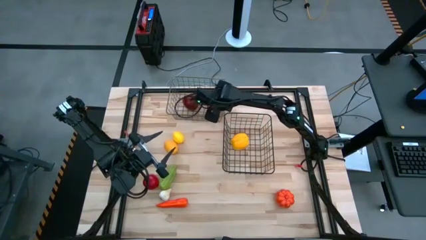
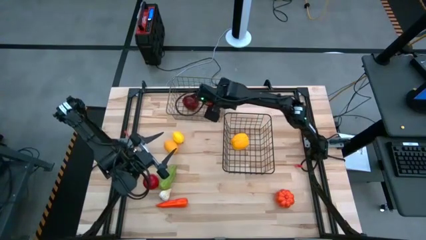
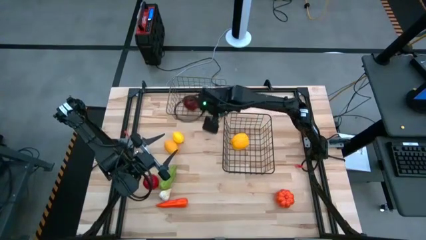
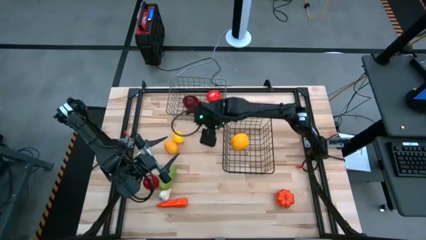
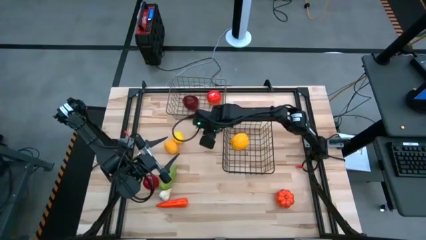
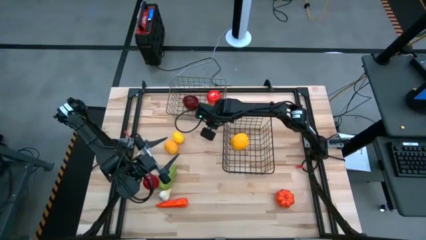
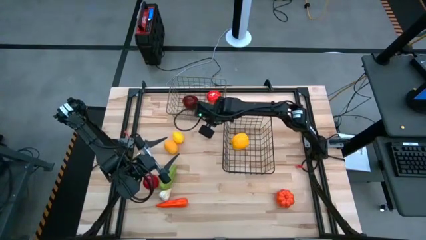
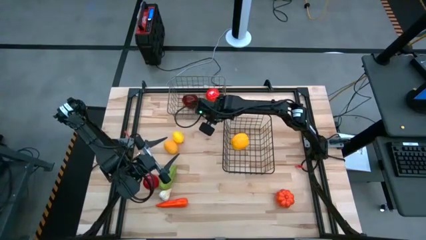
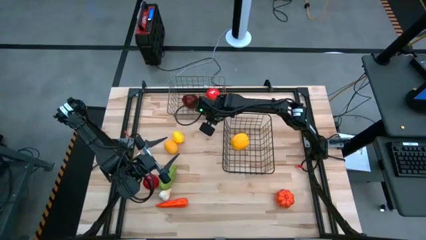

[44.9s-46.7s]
Task: Sort produce into baskets
Adjust the silver wire basket on the table

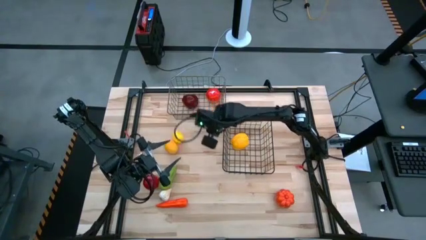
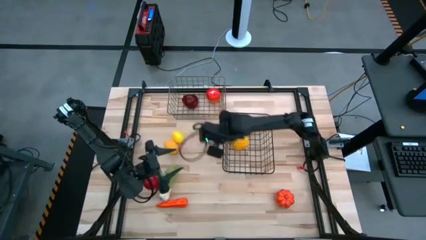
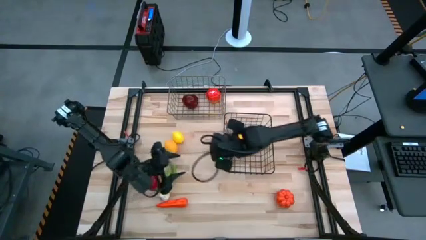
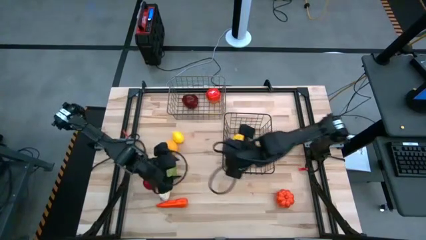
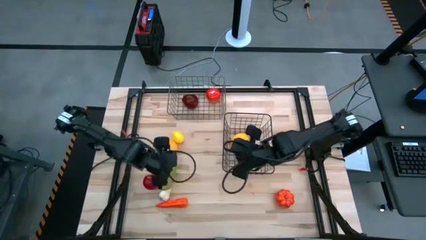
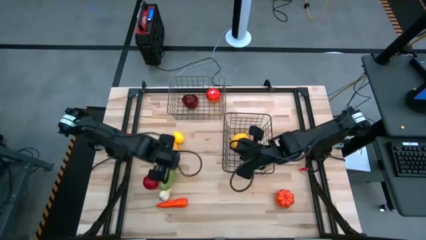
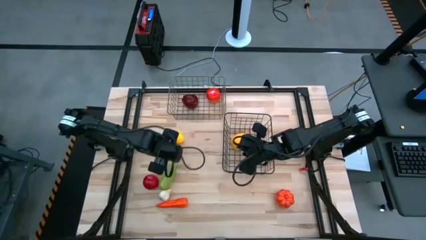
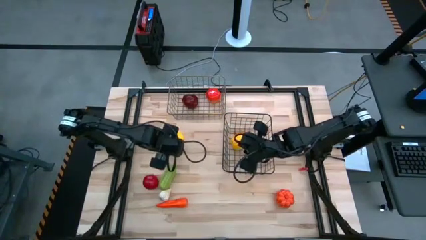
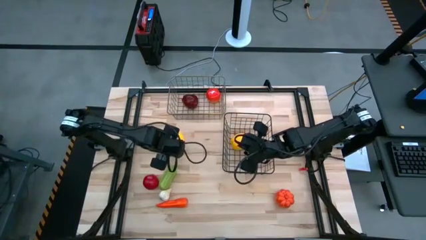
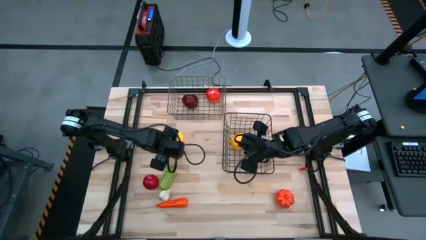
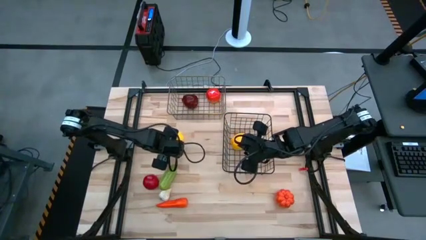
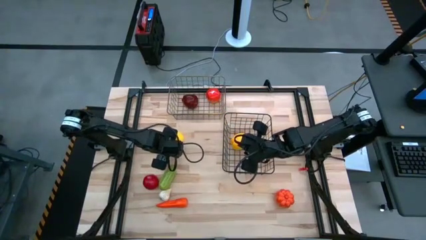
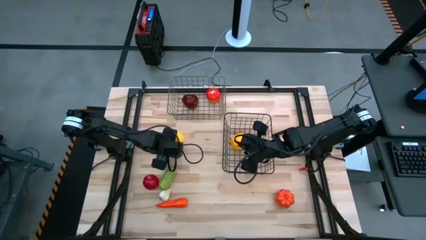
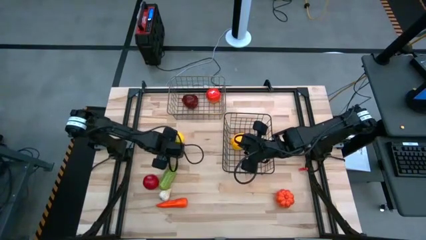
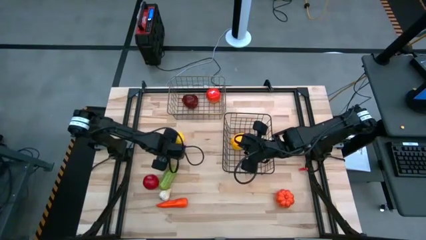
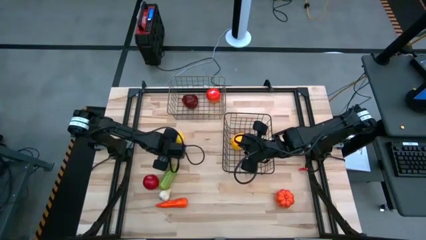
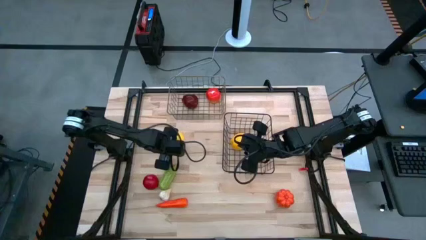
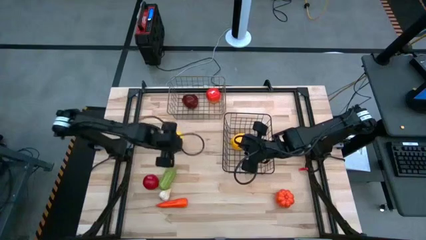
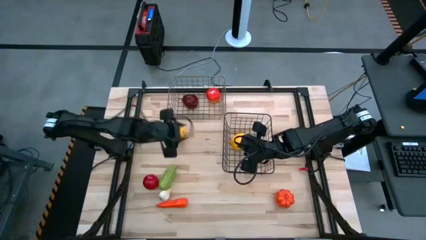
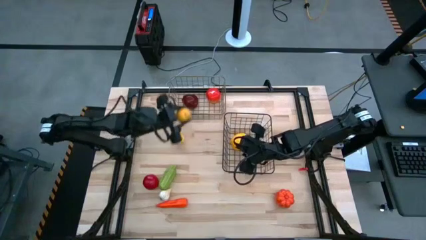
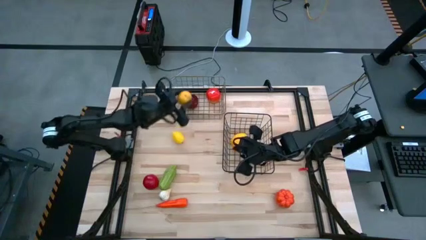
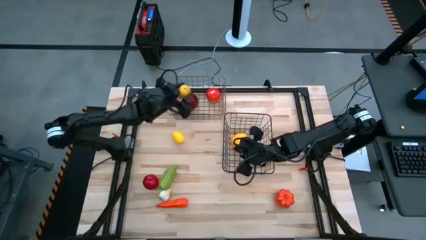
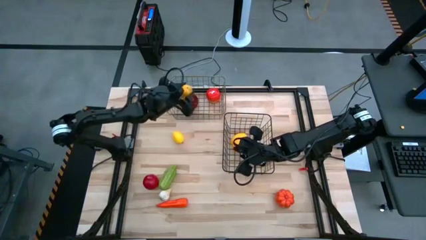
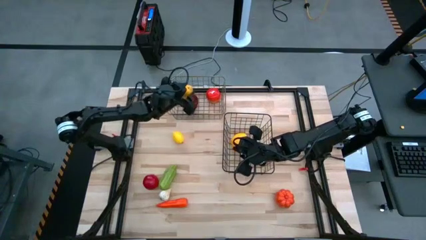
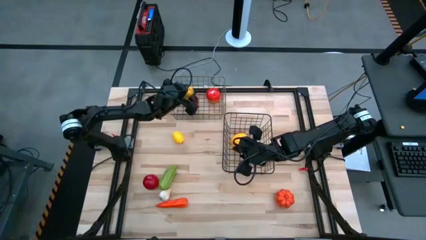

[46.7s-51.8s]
Put the yellow mango into the silver wire basket

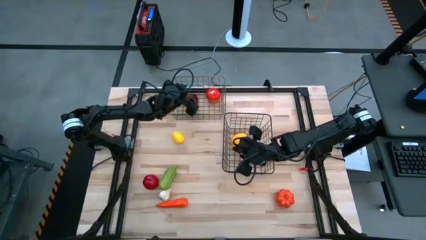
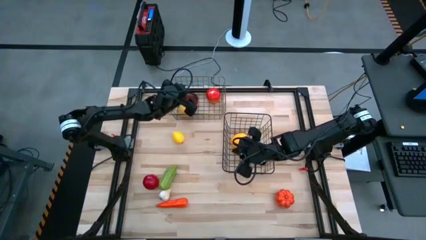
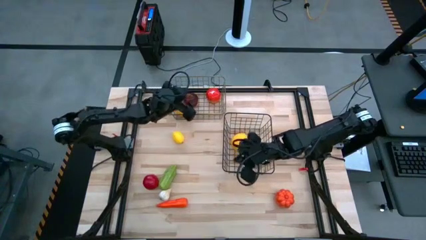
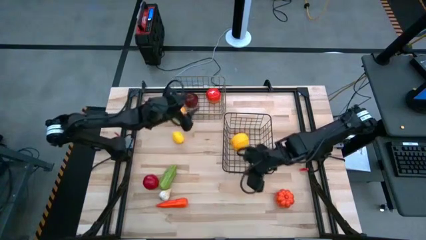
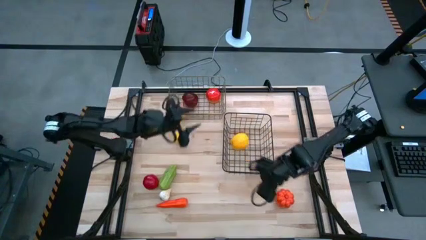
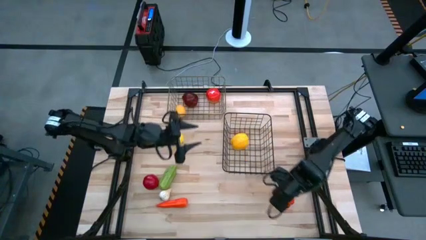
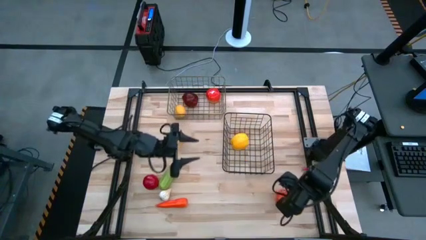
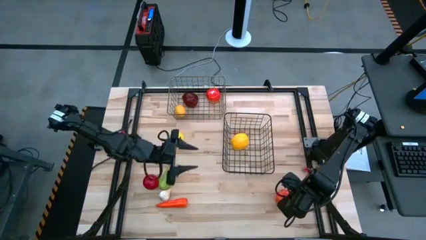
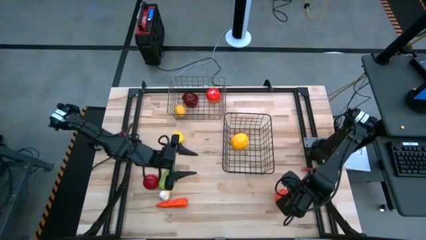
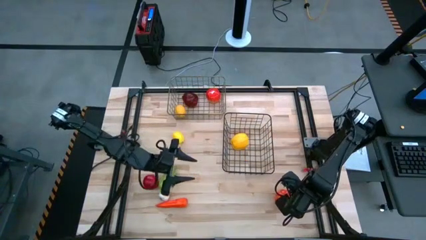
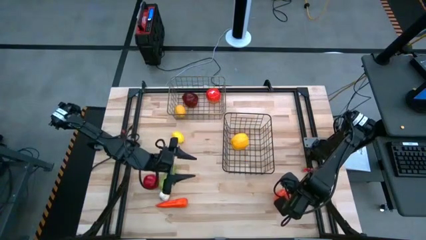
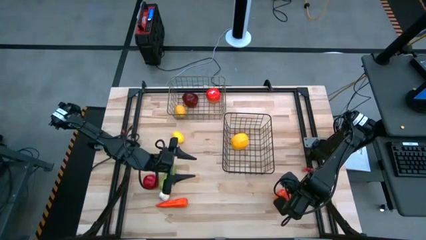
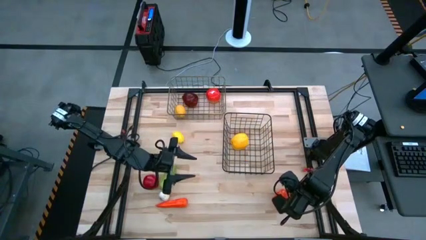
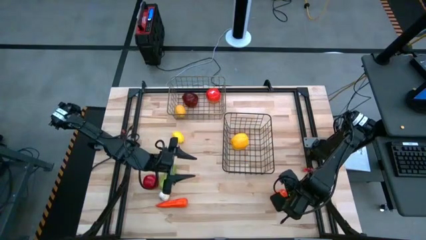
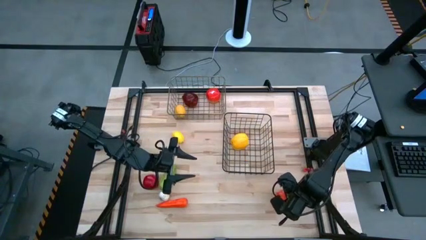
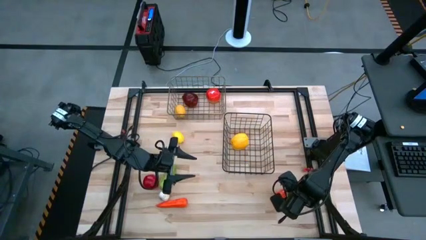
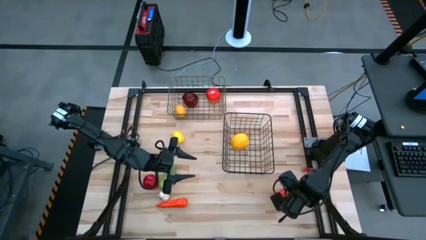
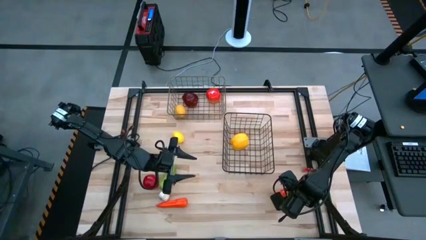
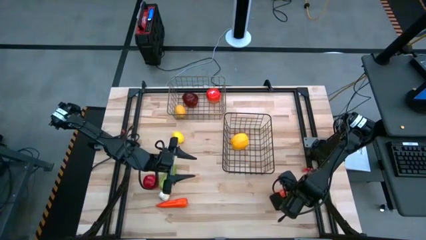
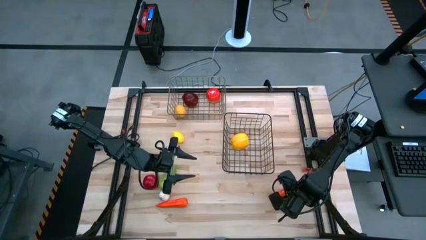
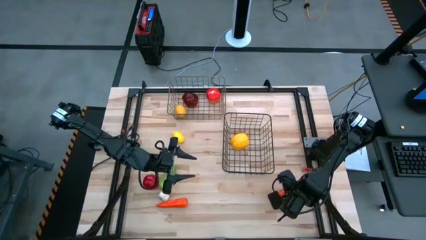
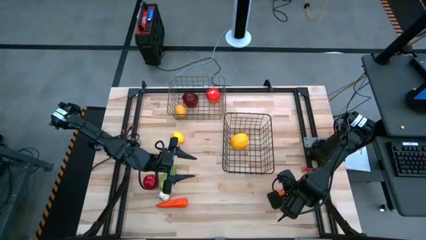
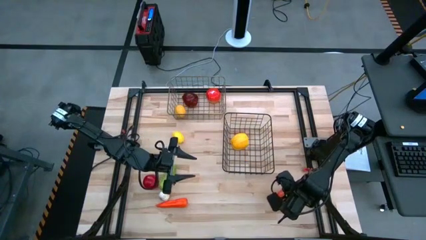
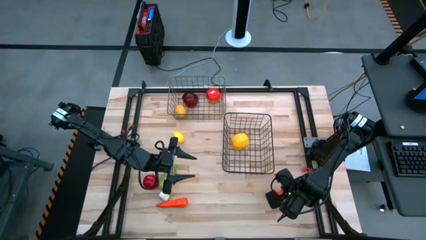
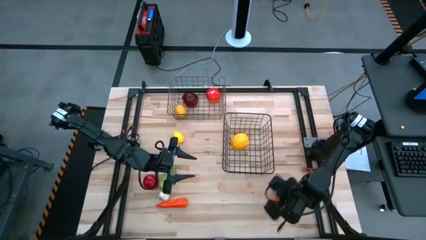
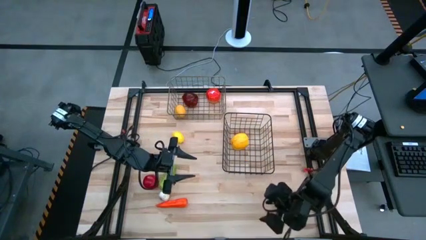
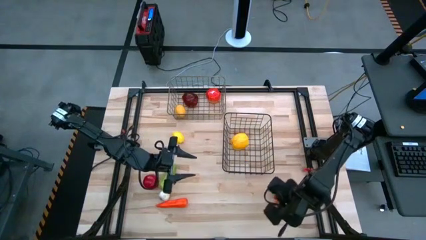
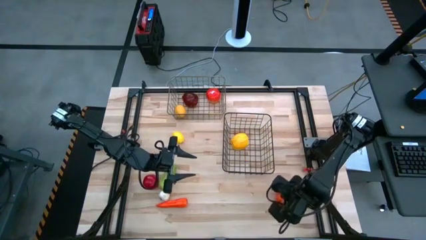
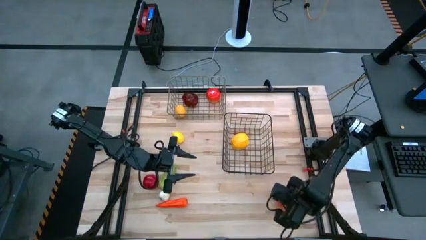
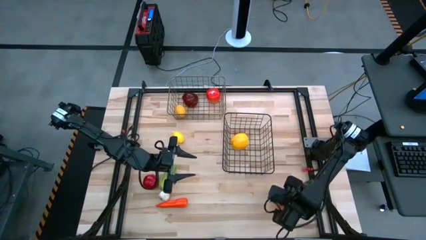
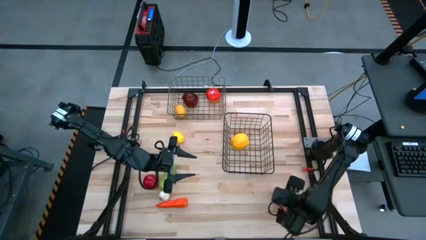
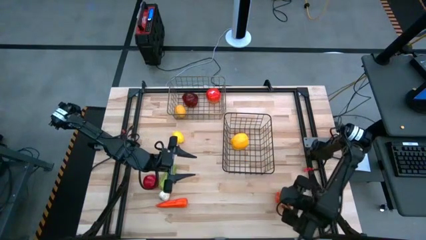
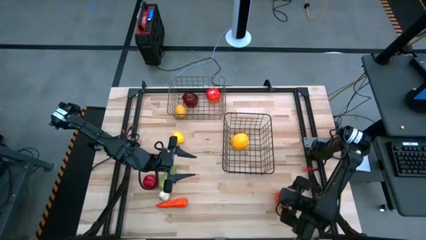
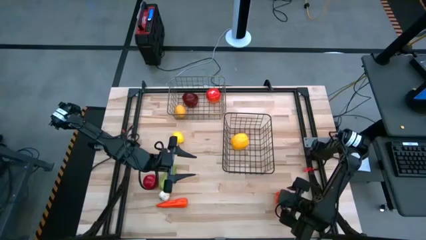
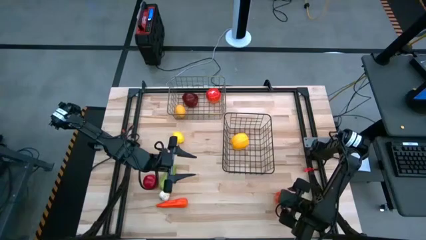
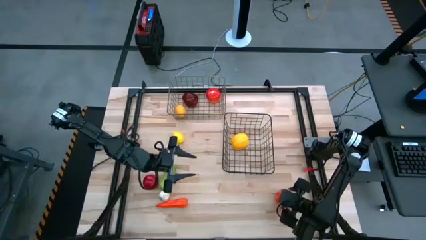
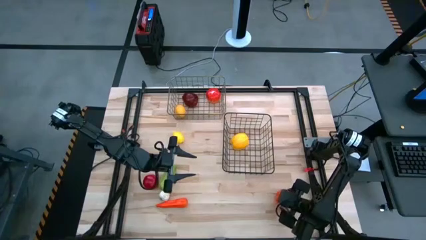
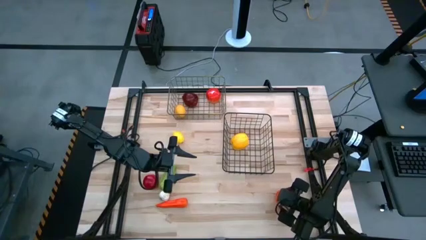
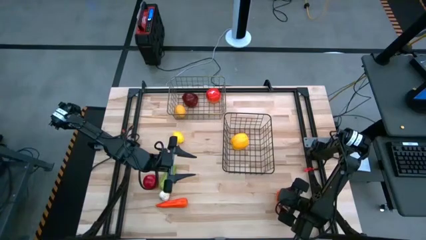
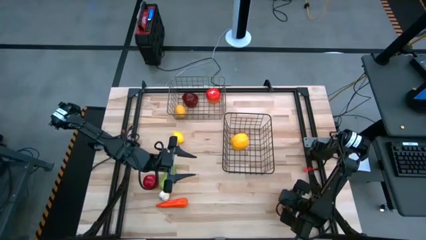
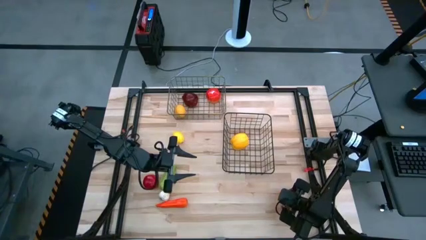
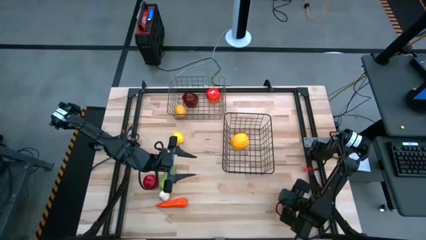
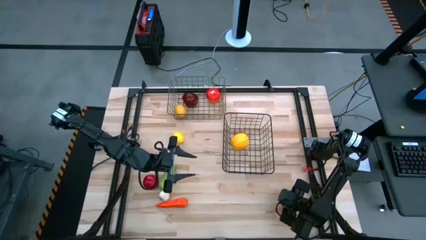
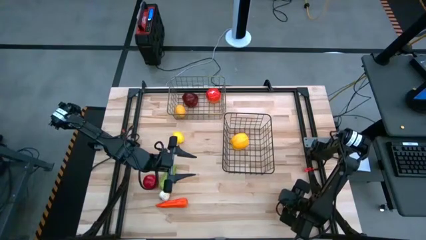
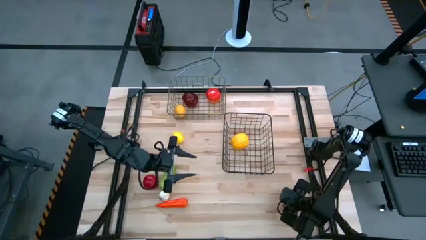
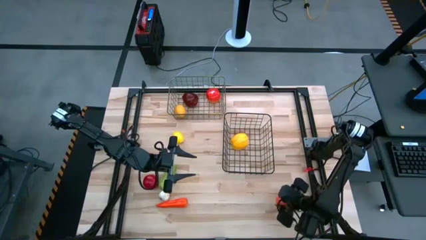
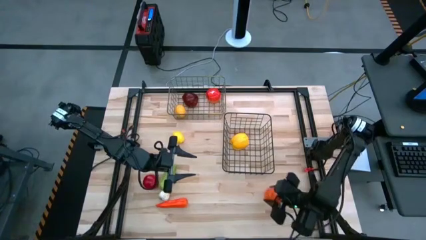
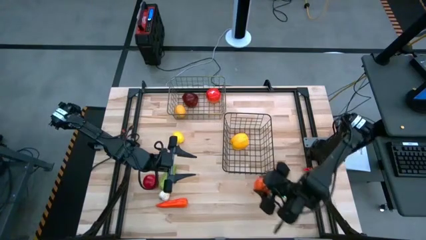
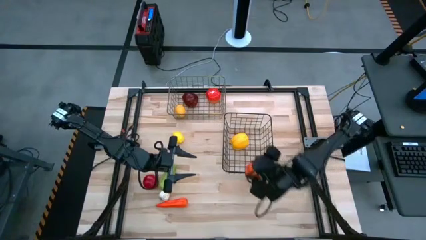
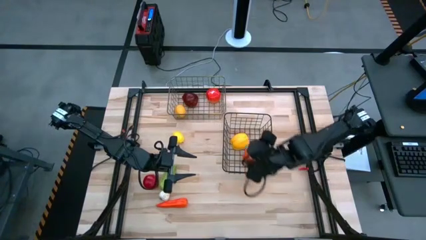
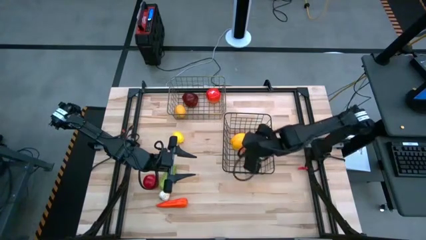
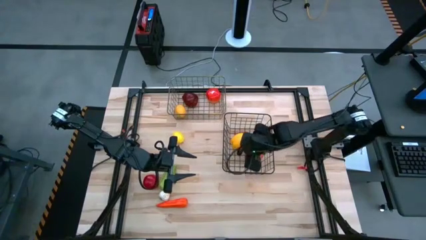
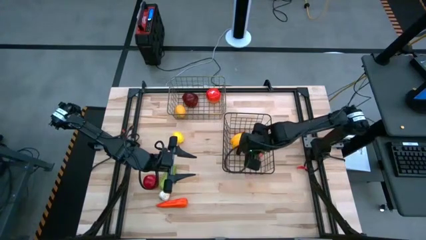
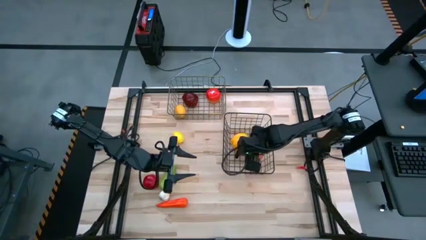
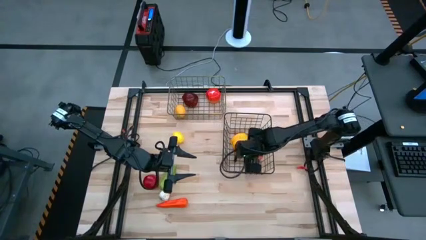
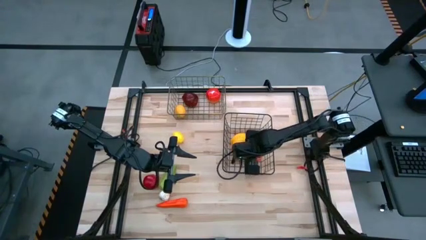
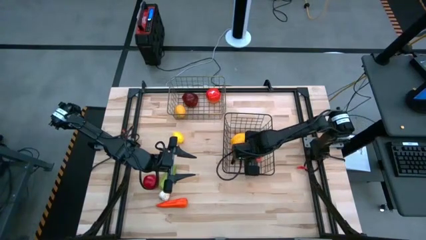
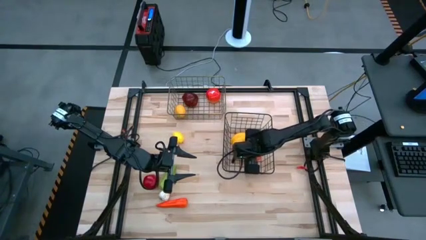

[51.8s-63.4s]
Put the orange pumpkin into the black wire basket
